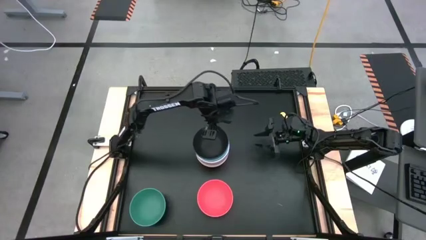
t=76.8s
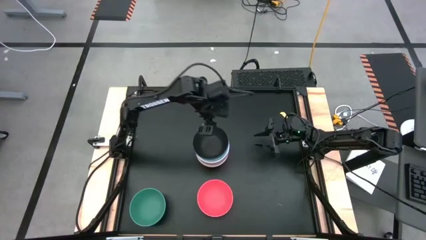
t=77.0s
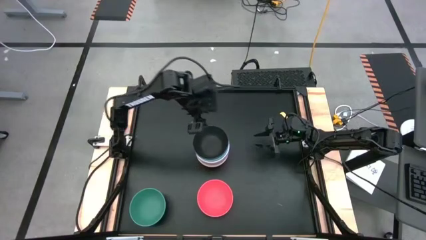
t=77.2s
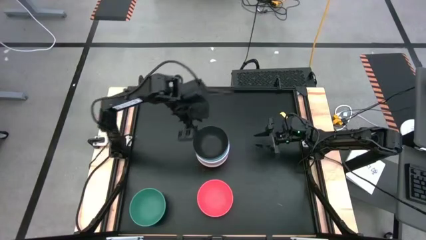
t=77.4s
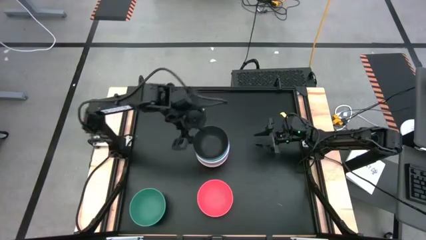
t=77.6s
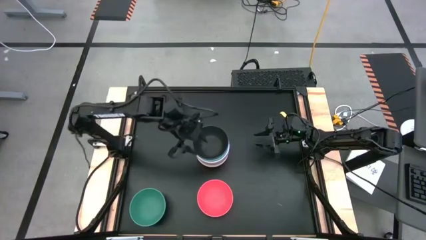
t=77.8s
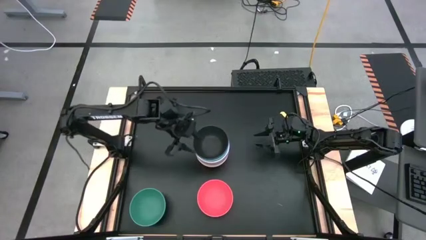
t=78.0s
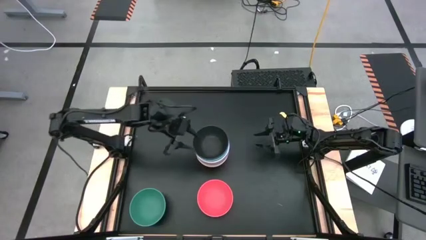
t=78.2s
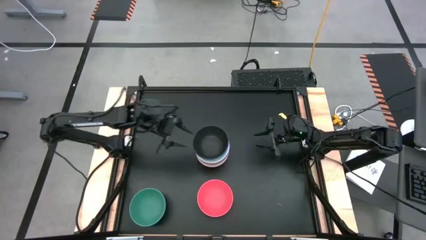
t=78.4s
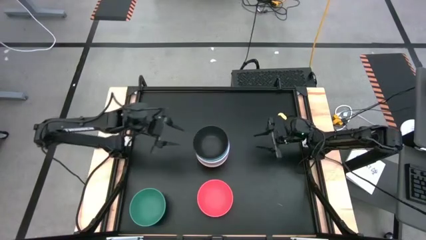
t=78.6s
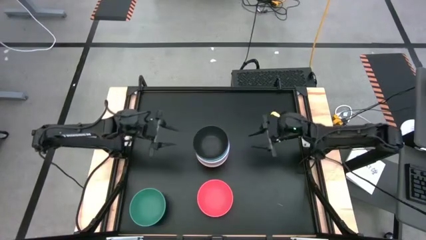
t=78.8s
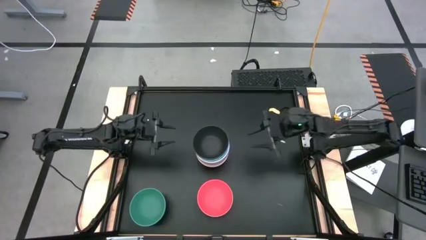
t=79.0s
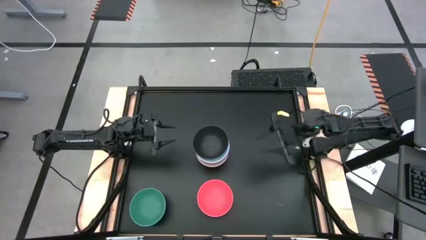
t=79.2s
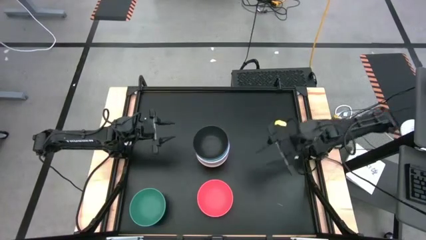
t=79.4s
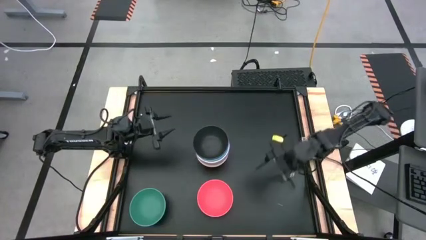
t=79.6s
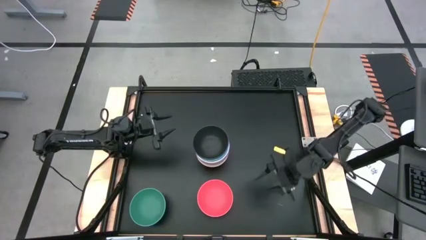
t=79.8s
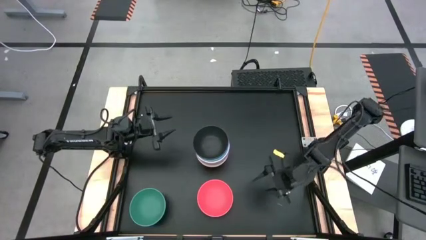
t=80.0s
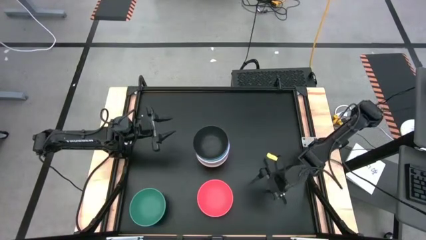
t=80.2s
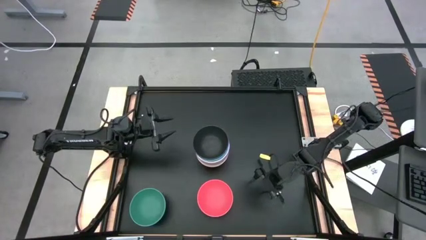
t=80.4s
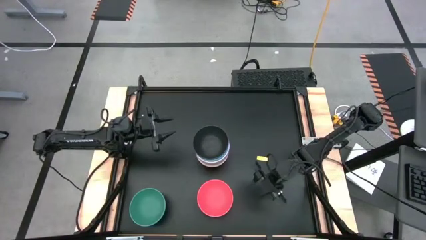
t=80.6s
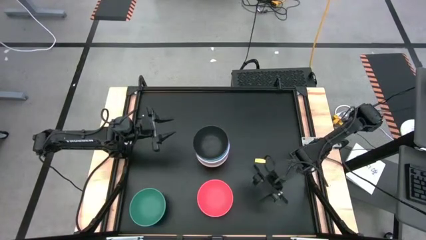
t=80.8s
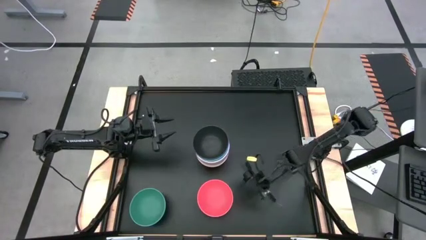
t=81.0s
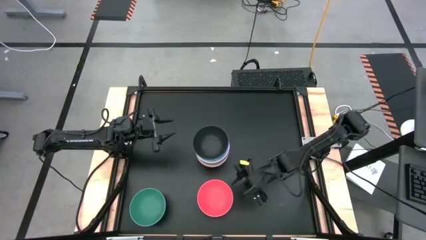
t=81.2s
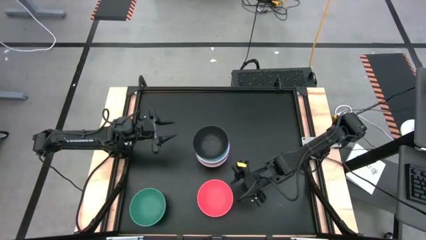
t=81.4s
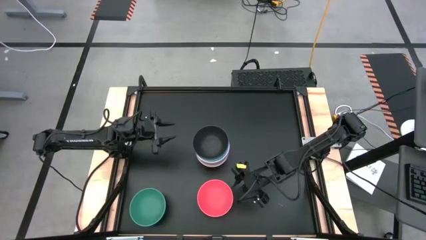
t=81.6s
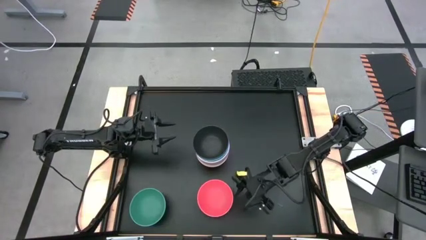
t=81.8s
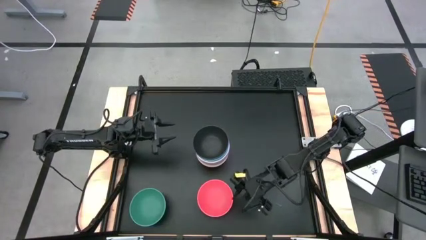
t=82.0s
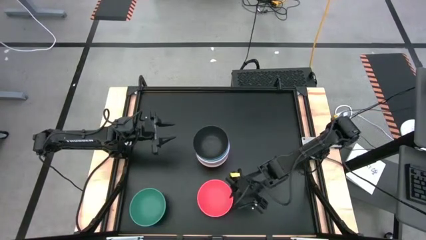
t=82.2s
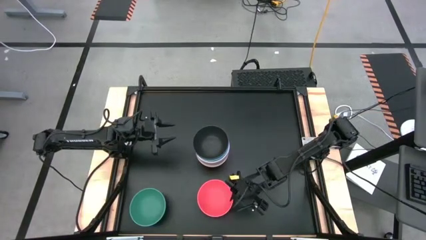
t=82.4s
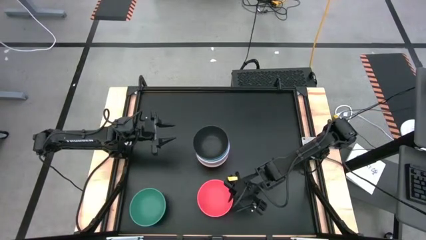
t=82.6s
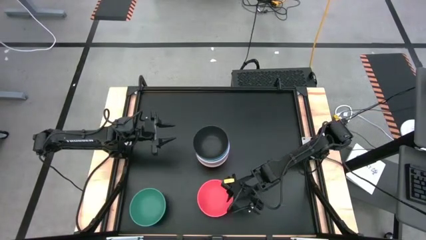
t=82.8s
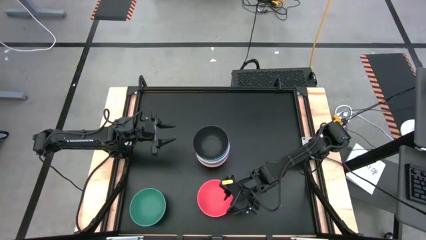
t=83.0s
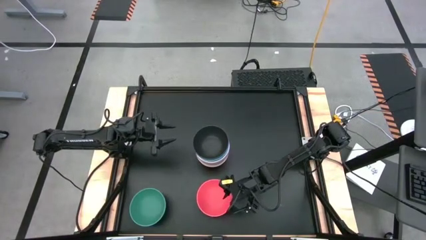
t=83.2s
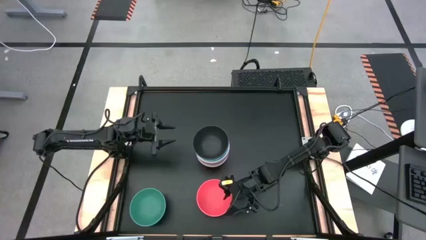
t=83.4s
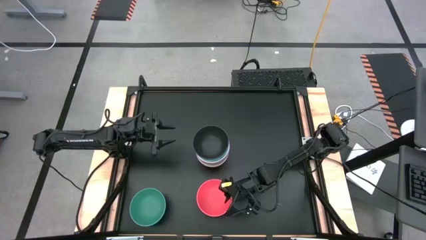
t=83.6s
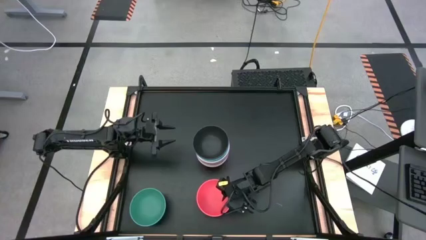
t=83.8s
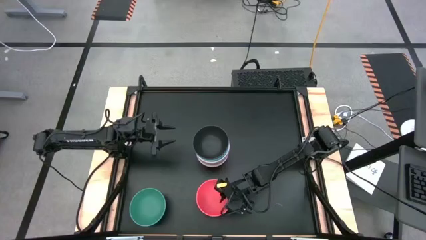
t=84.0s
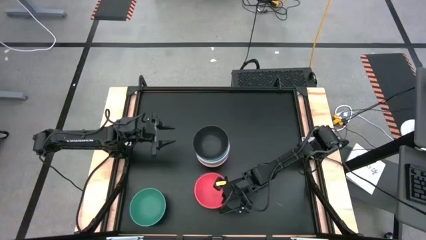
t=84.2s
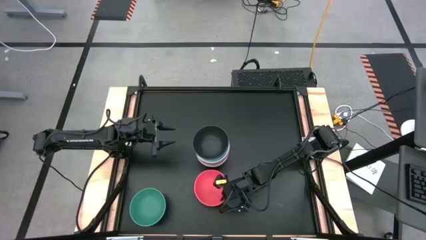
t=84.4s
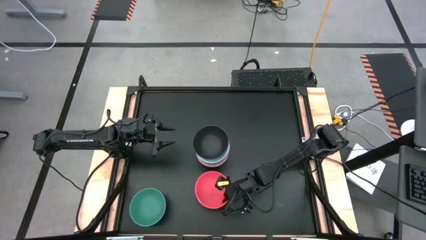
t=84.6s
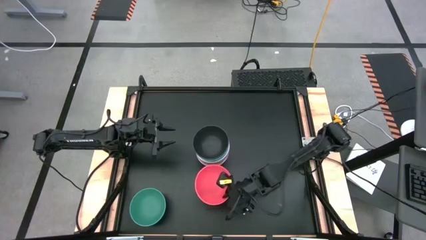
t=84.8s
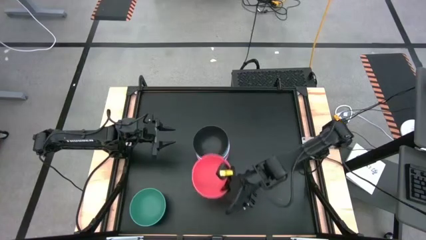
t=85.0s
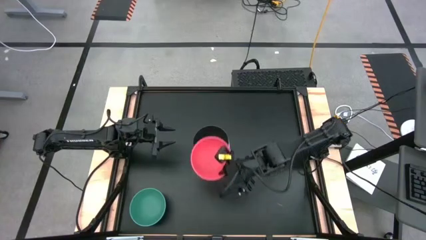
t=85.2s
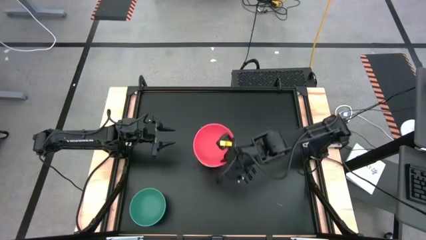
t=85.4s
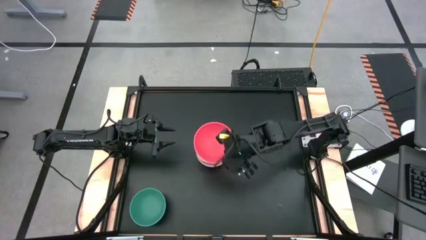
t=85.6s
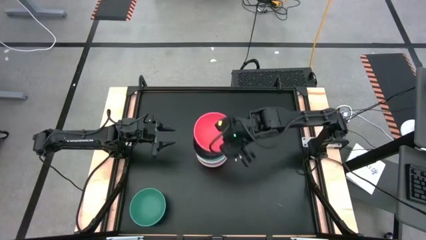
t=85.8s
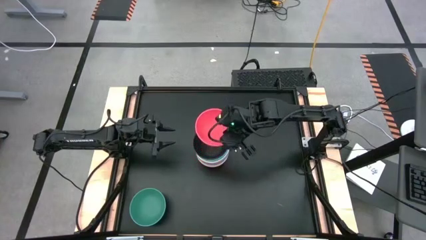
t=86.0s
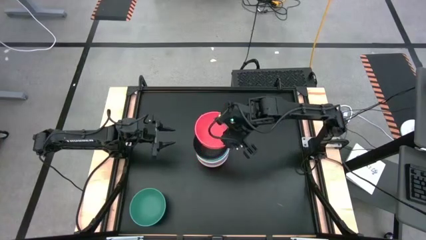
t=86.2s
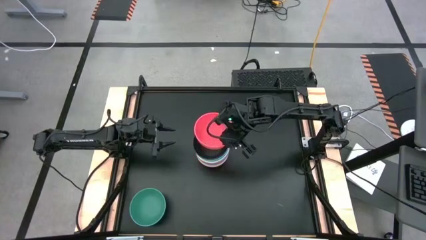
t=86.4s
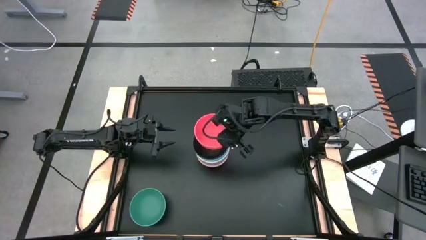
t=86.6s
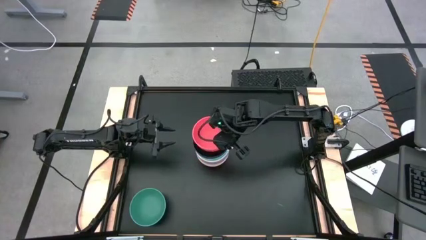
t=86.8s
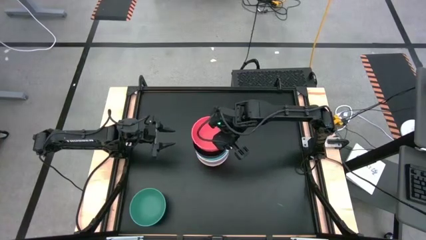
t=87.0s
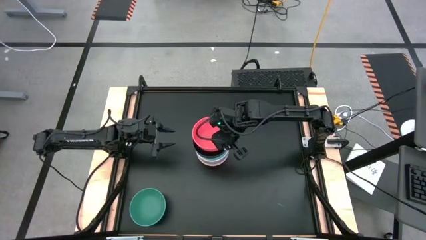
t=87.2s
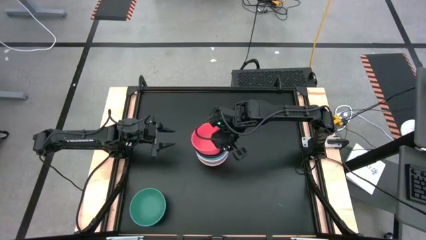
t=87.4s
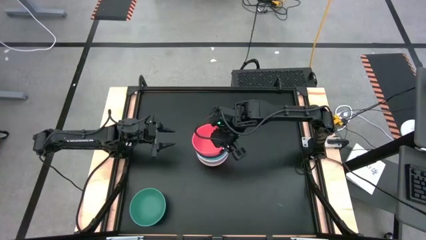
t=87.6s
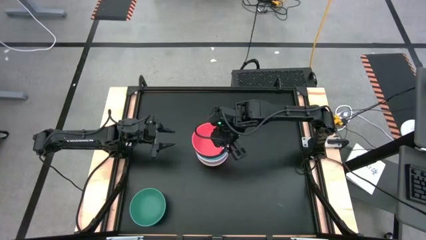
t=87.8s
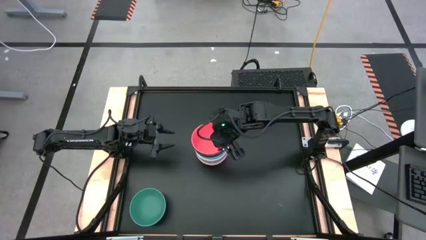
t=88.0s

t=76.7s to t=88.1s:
Task: Nest bowls inside each other
Stack the red bowl on top of the black bowl

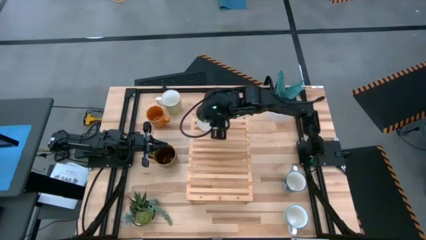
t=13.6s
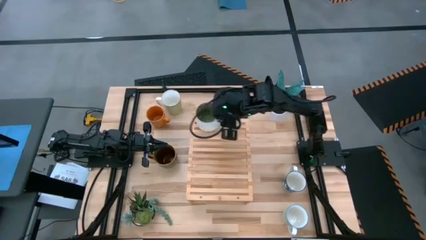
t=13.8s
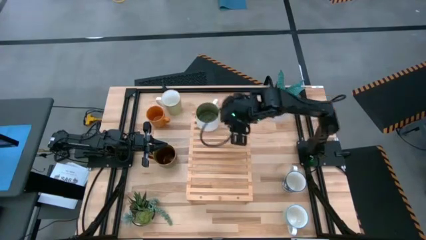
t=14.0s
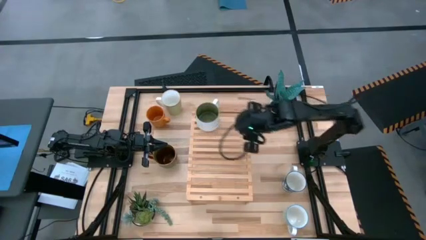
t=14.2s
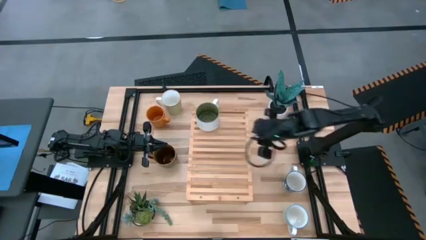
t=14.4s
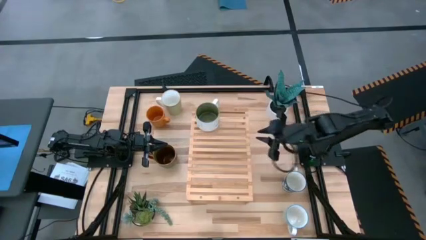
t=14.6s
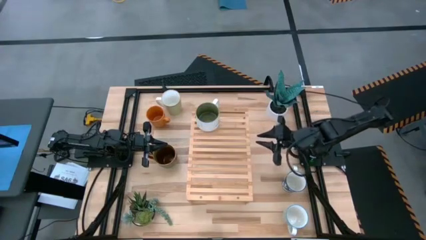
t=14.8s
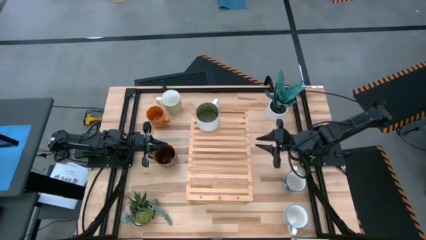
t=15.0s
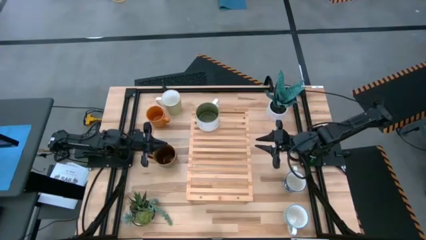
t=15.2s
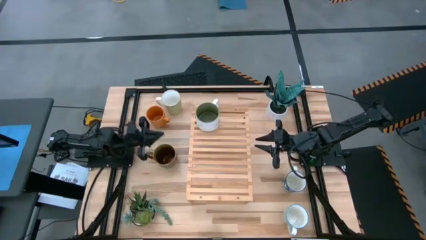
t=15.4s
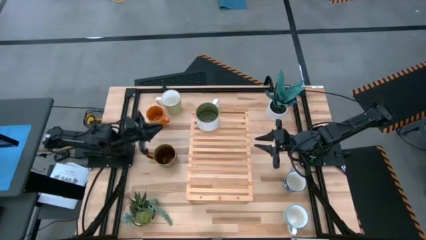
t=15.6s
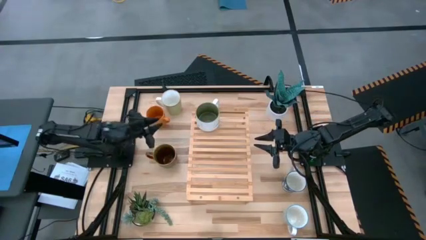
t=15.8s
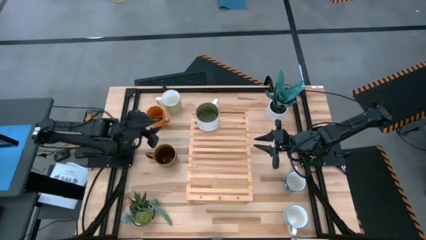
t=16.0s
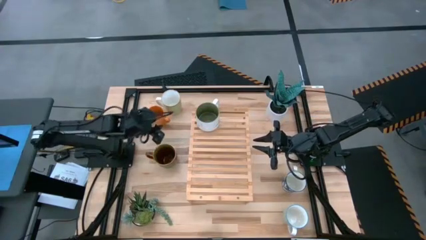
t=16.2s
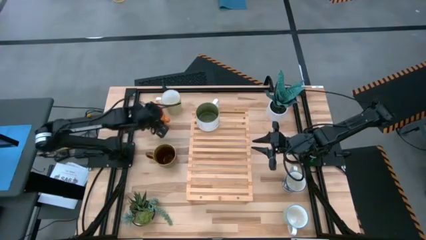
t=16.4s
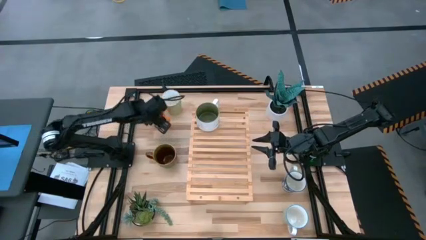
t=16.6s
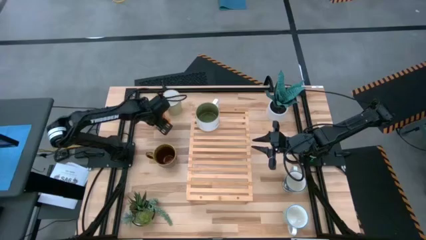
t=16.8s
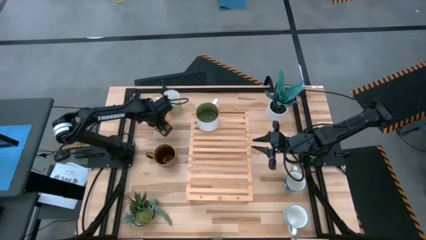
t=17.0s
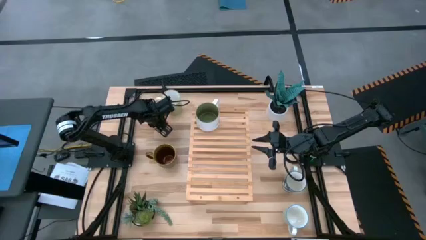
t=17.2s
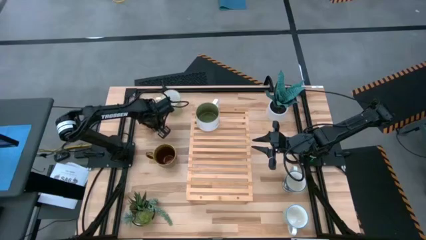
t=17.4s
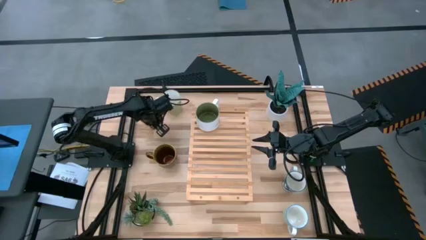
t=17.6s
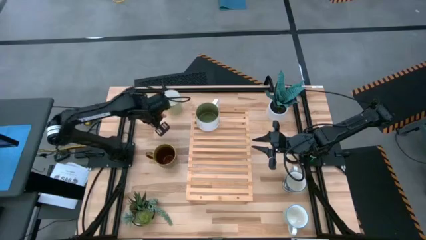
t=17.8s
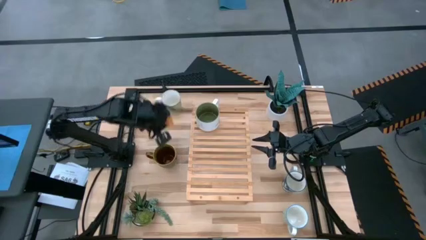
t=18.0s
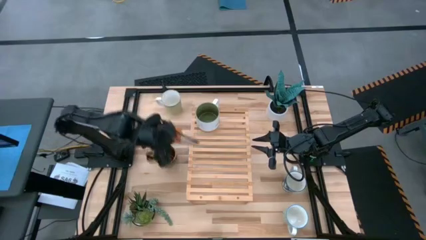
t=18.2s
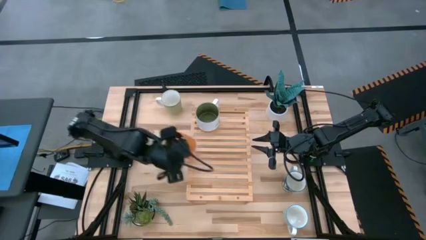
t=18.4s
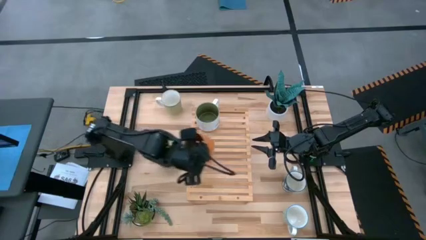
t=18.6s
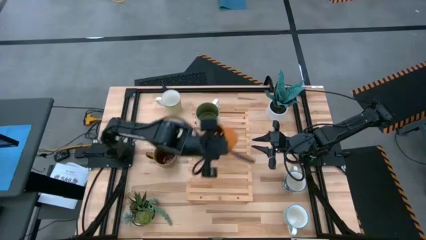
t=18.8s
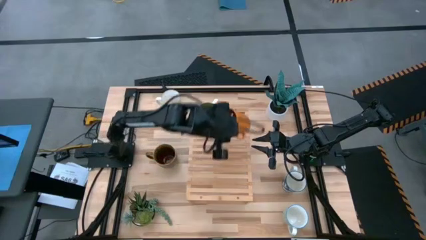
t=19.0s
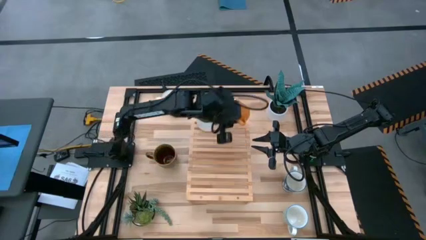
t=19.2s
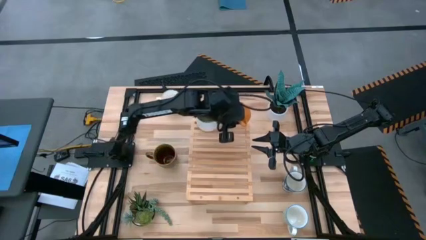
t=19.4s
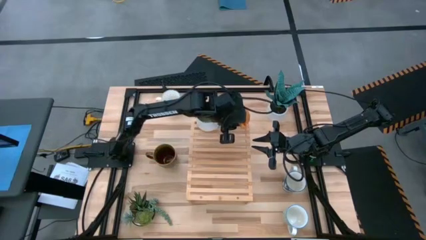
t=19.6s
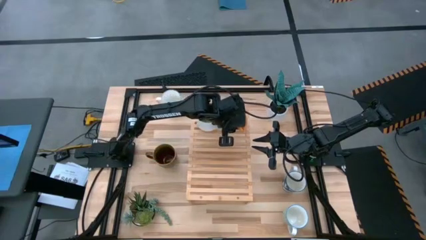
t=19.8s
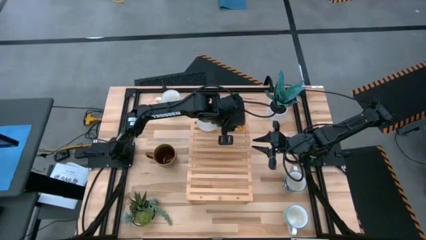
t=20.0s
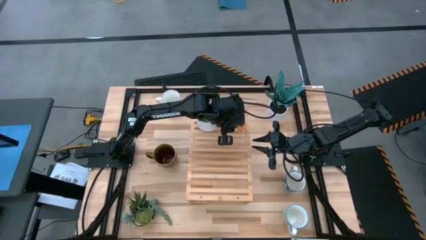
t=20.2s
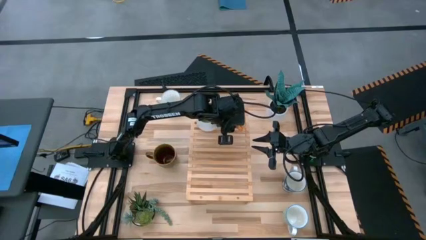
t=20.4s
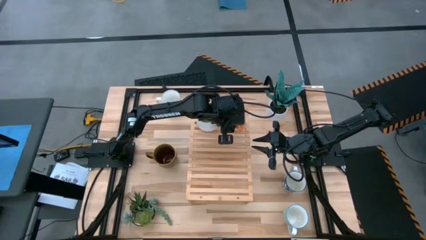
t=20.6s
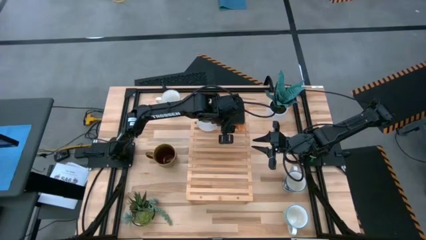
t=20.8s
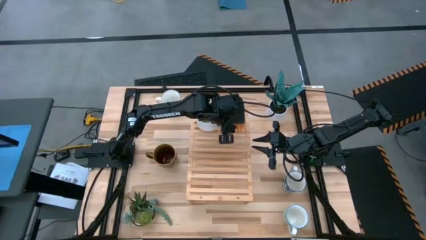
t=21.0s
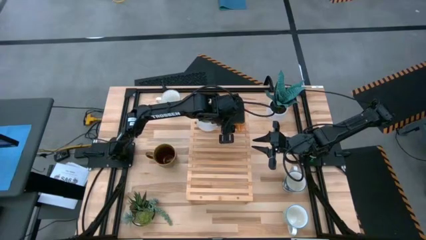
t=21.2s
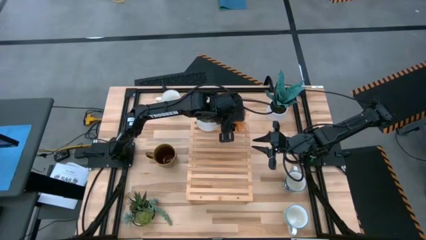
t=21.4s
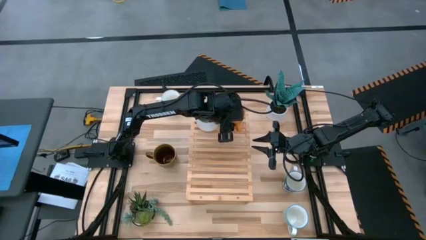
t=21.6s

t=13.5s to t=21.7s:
Task: Place coffee mugs
Put the orange mug on the shelf
